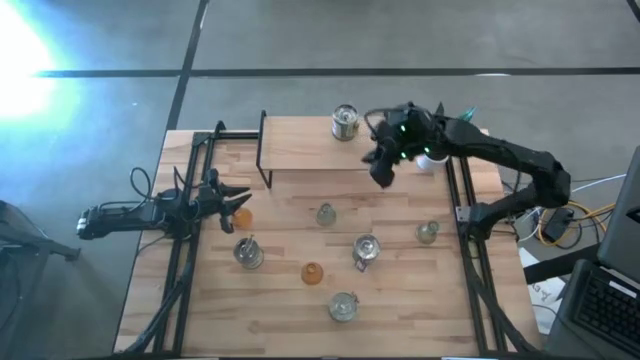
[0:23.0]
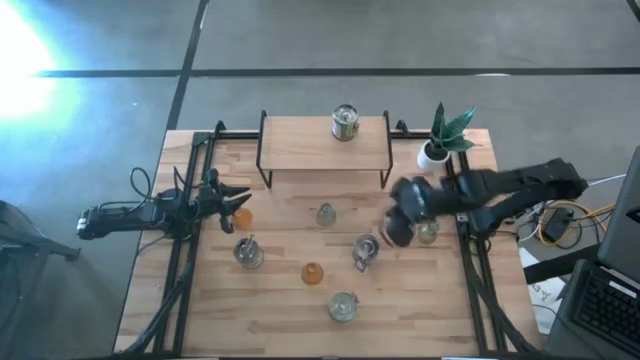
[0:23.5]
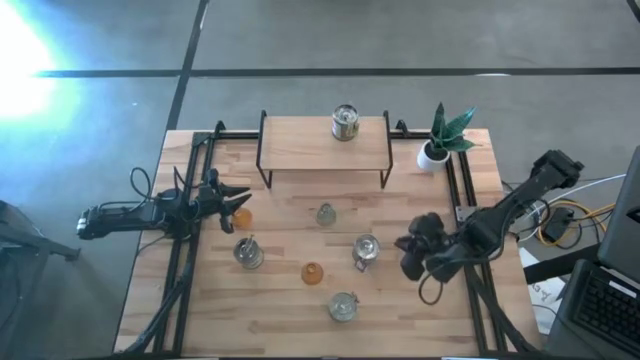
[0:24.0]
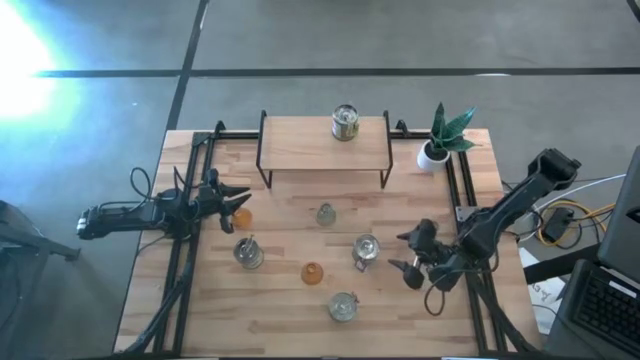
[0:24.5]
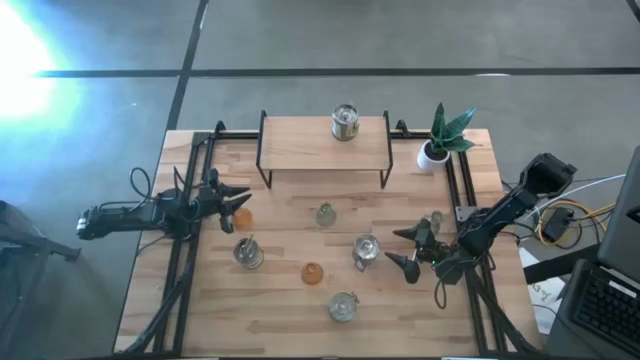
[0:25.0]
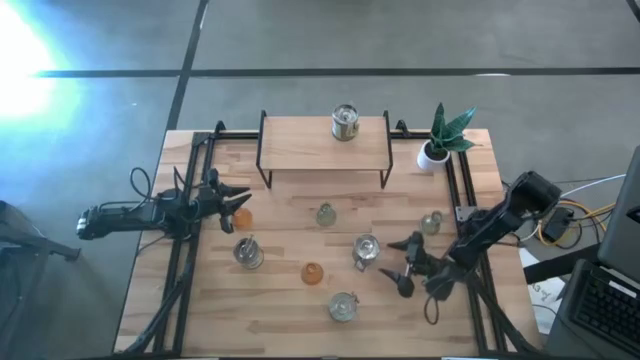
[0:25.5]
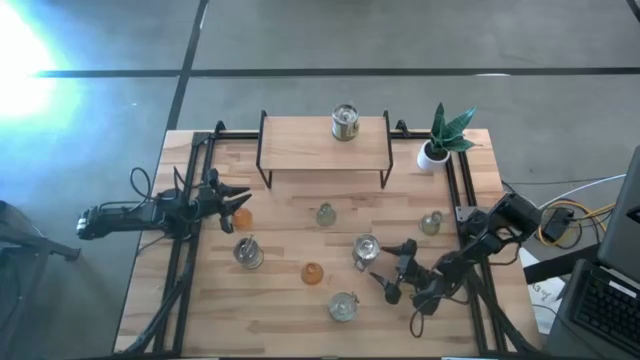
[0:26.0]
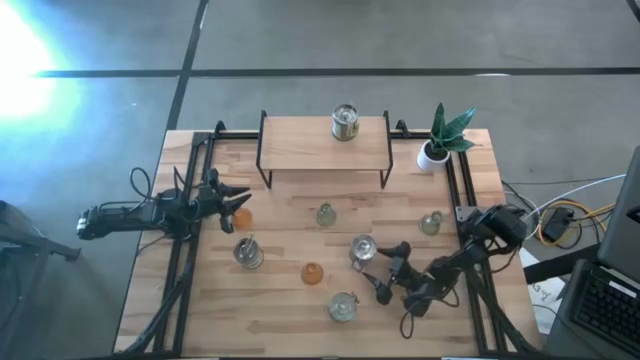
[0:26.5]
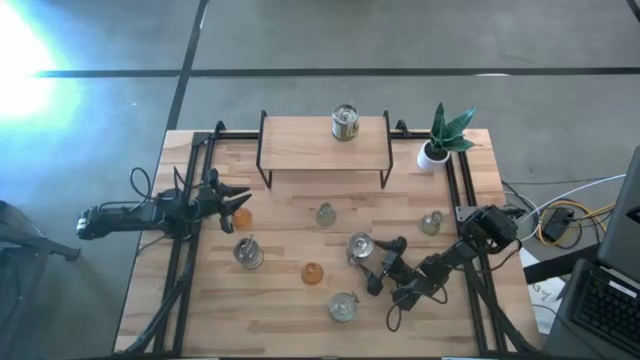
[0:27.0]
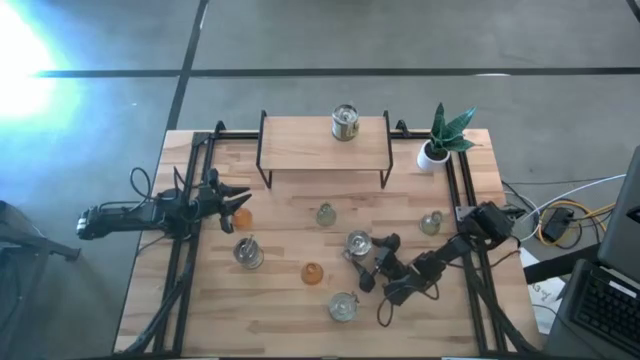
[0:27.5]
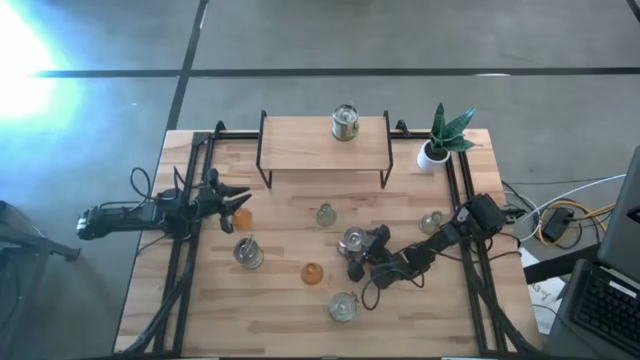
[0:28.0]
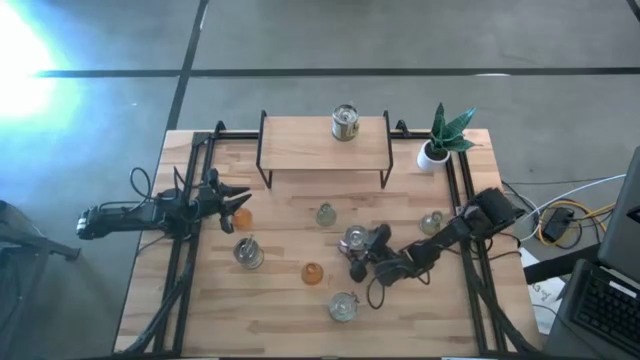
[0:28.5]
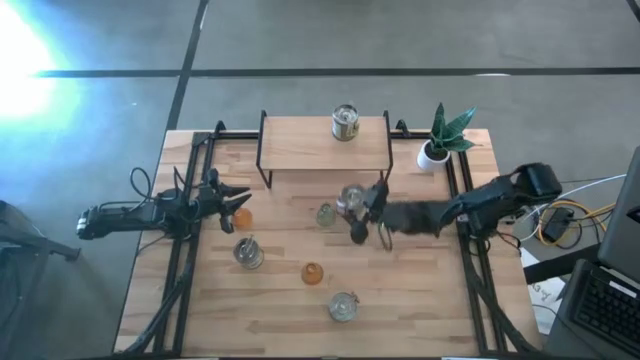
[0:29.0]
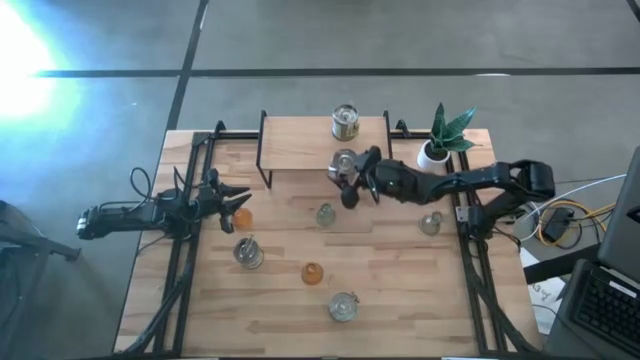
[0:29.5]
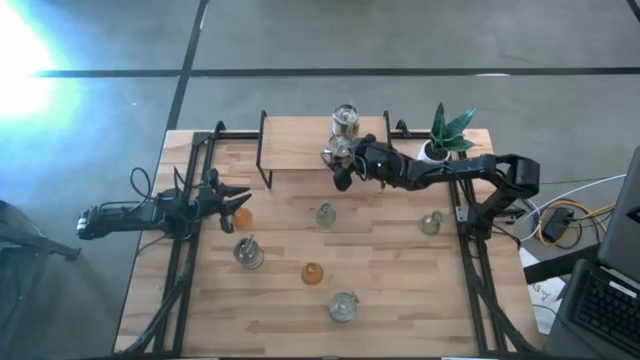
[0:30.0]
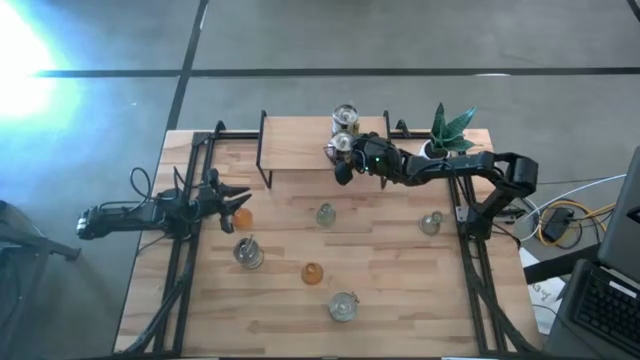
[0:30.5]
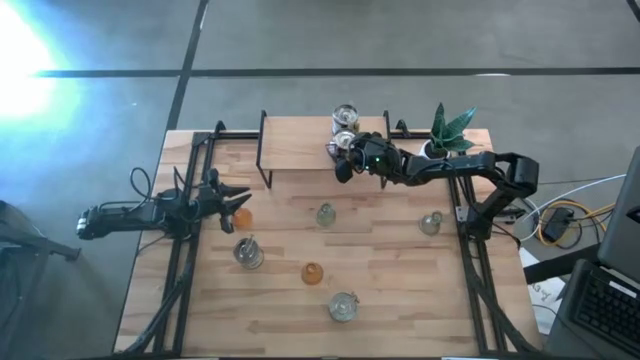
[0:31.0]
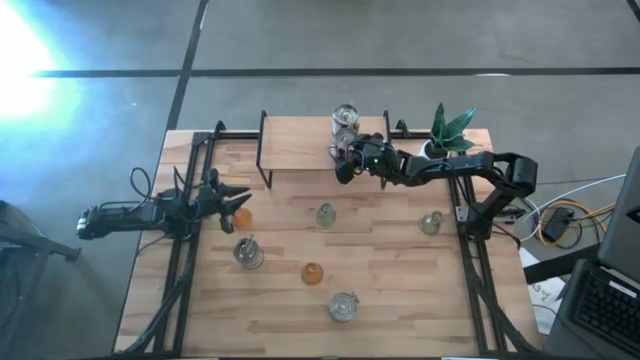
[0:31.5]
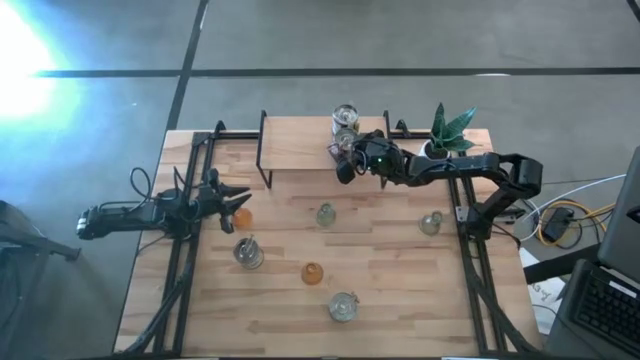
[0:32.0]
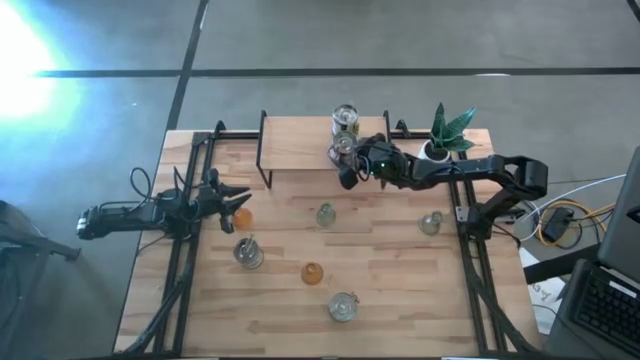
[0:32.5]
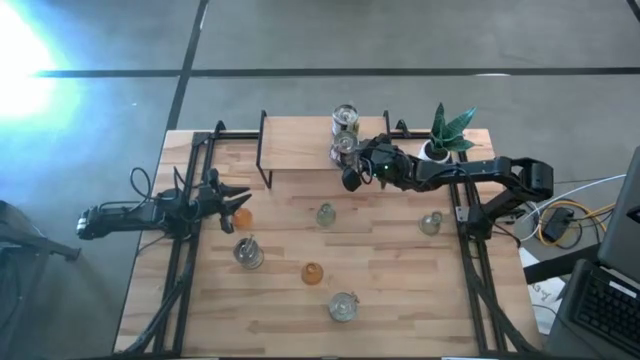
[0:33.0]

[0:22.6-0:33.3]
Task: Pick & Place candle stick holders
Put the top brown scented candle on the shelf

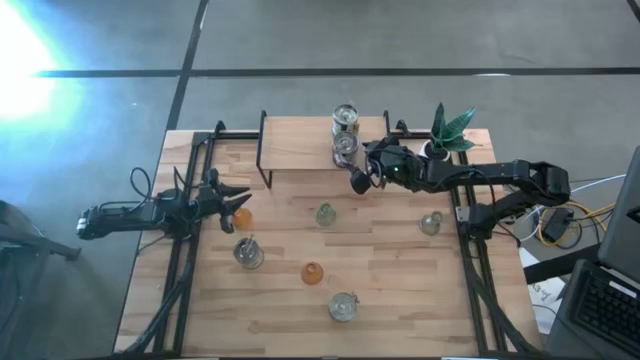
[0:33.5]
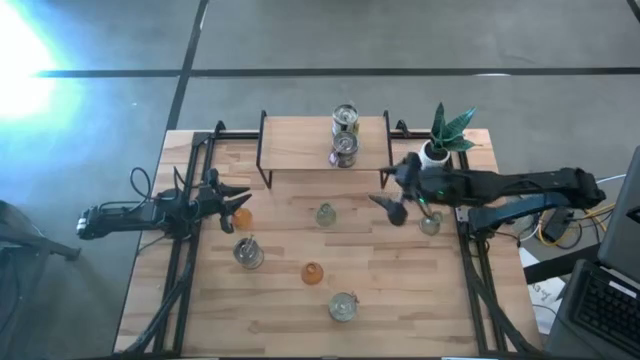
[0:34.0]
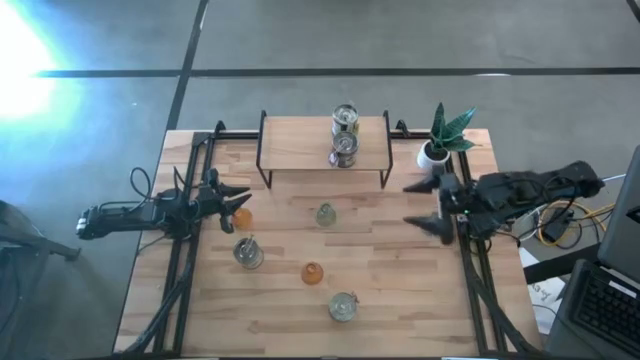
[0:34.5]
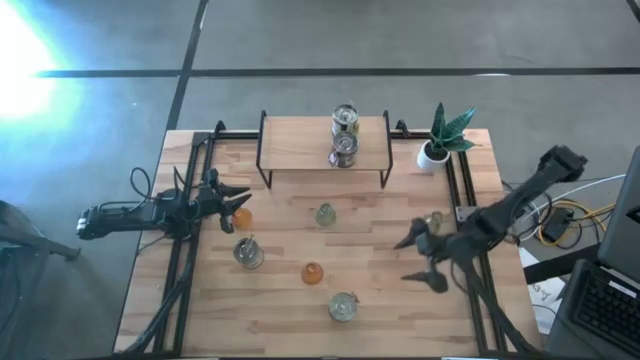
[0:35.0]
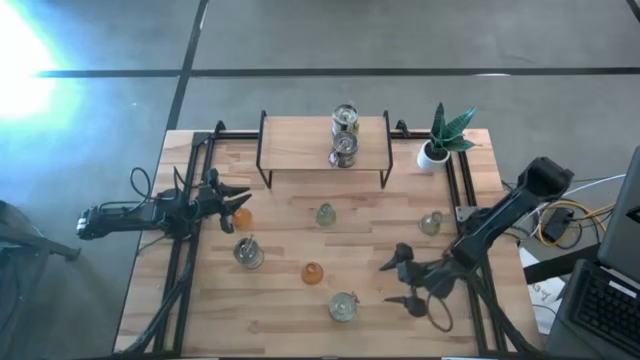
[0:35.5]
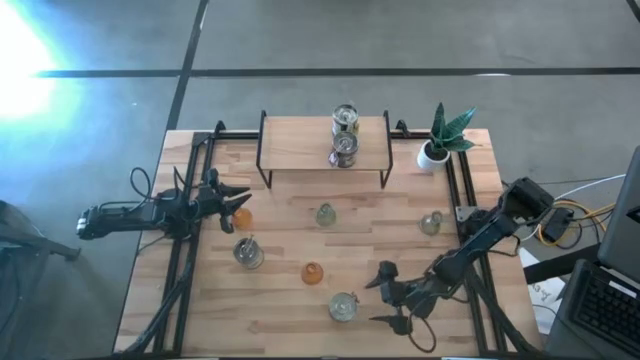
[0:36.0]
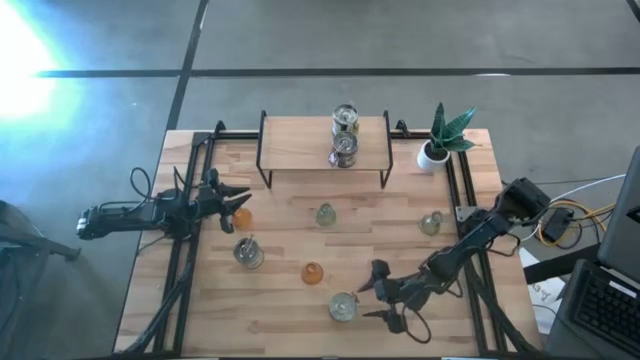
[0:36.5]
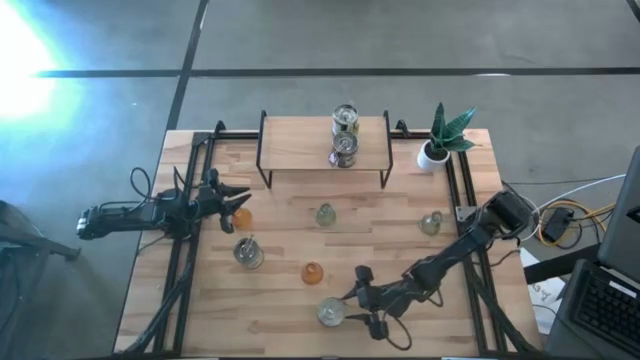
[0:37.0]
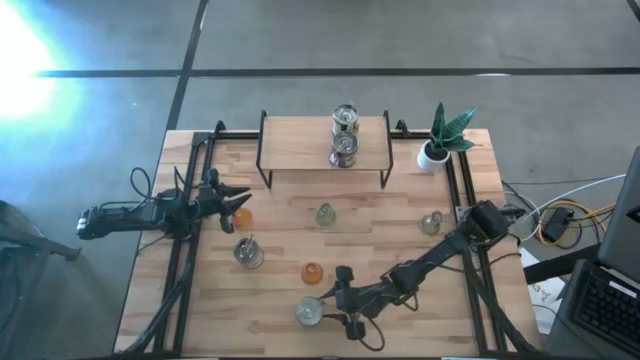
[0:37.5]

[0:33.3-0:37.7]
Adjust the brown scented candle

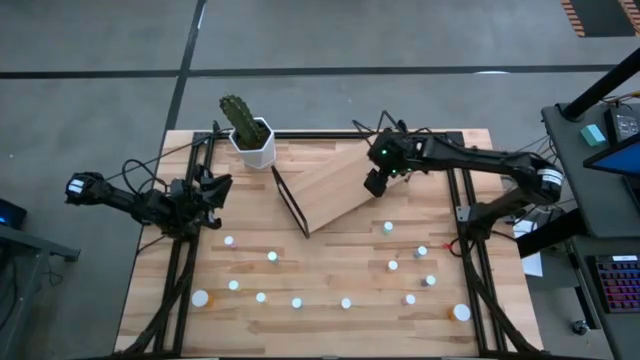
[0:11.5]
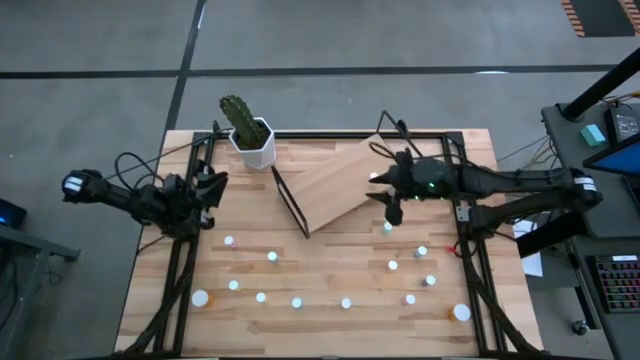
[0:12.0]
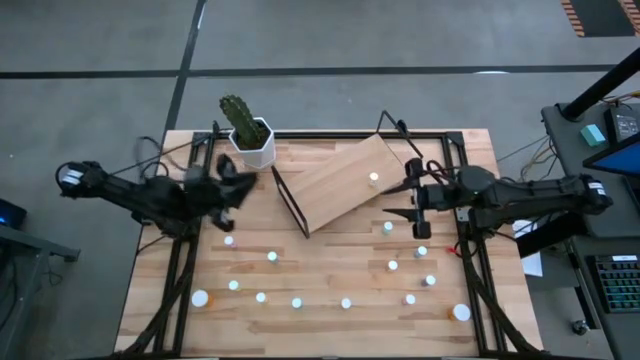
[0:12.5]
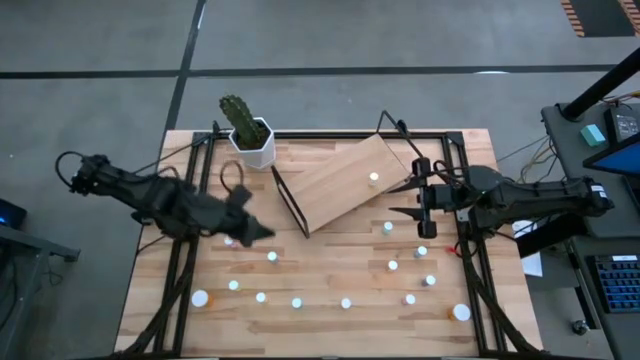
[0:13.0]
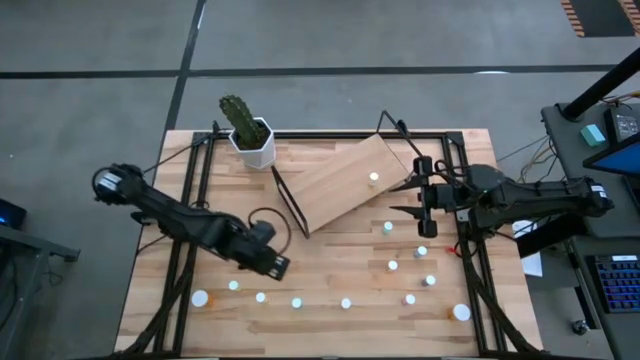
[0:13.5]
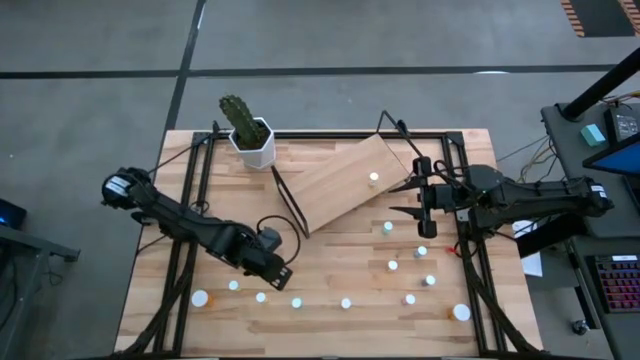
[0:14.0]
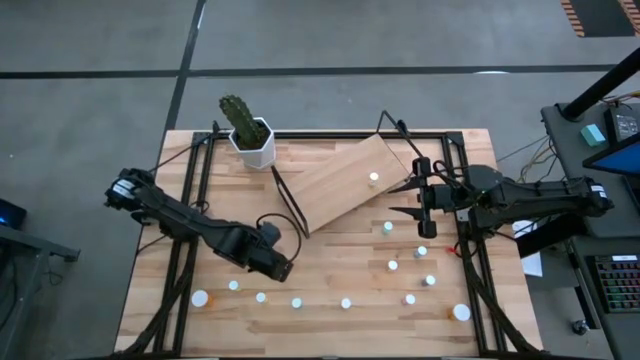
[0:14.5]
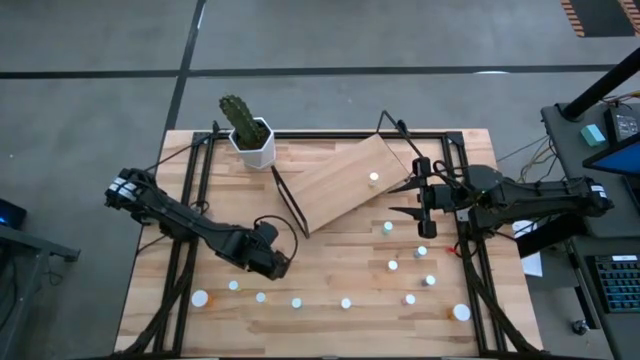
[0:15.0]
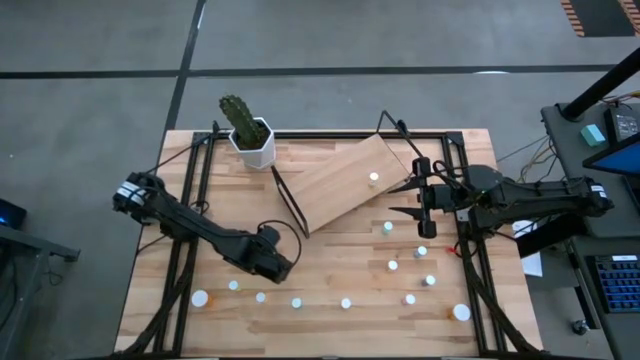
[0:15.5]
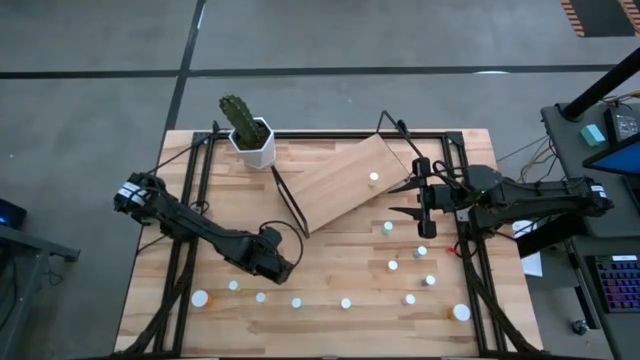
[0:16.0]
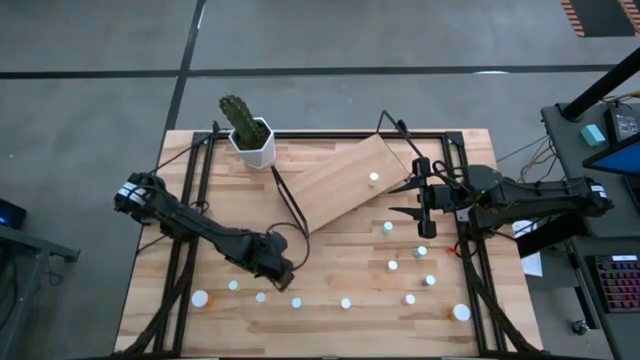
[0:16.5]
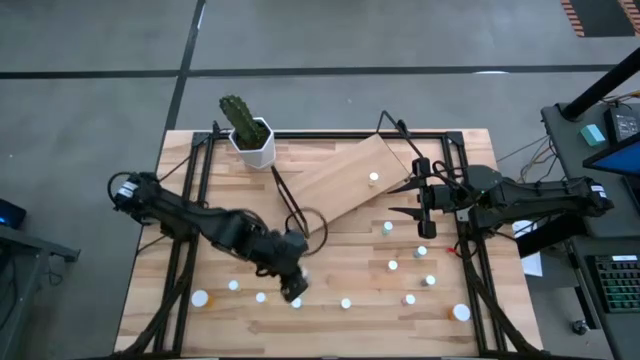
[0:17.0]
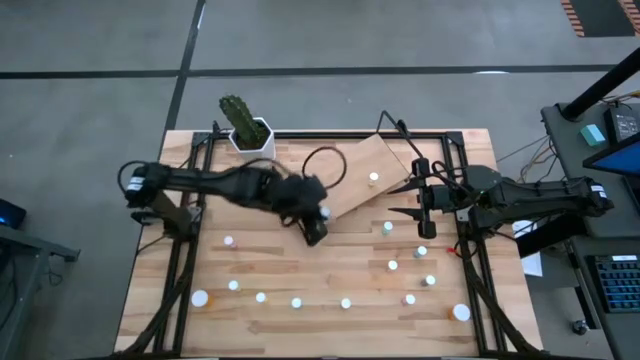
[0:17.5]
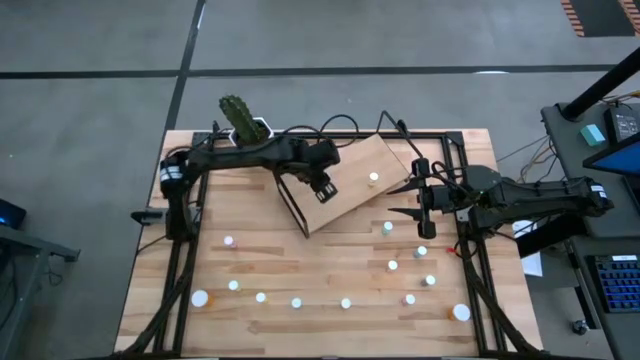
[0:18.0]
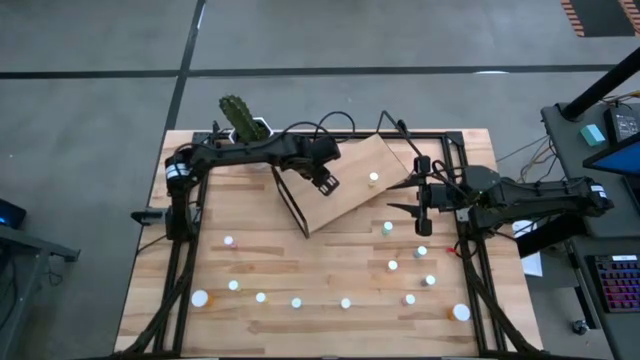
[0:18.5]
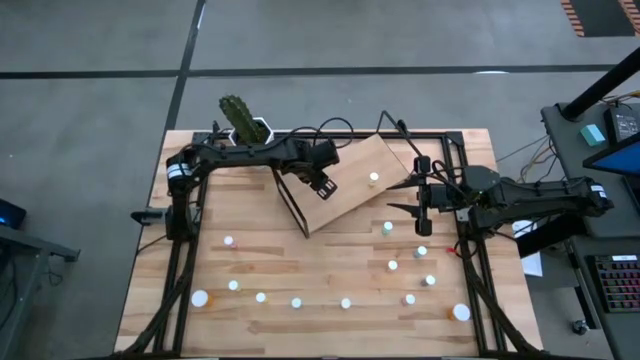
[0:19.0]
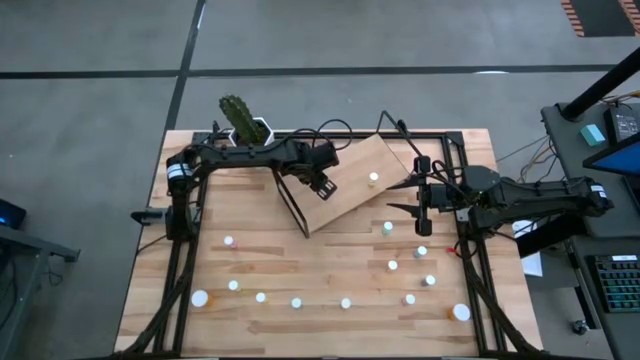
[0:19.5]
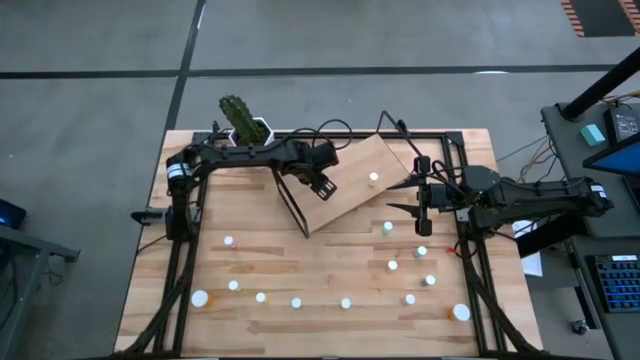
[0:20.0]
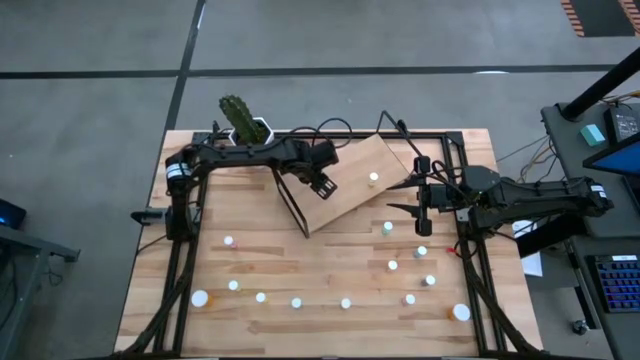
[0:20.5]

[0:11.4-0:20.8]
Task: Pick and place medicine bottles onto shelf by color
Put the green pill bottle on the shelf
